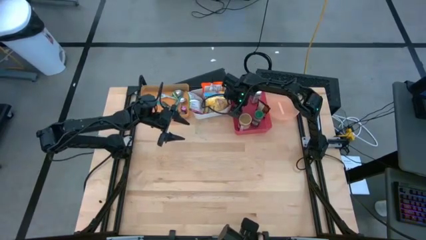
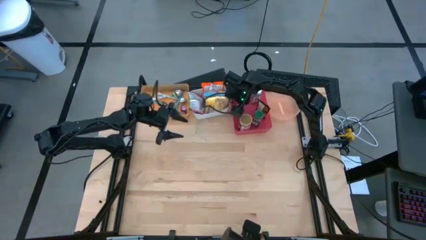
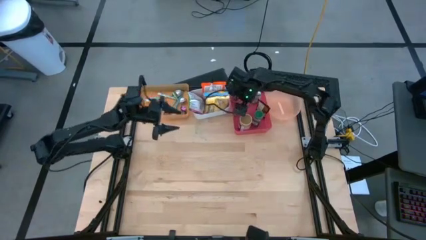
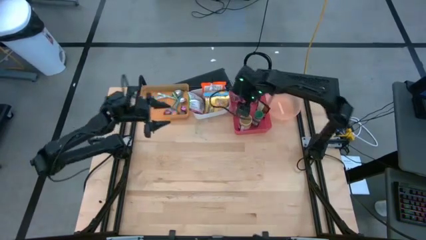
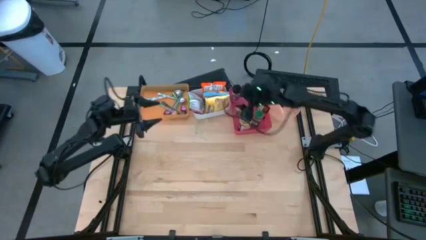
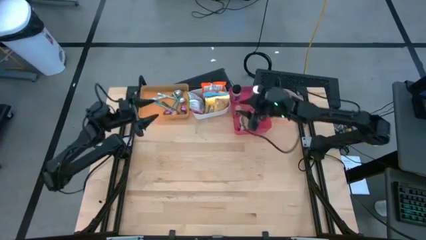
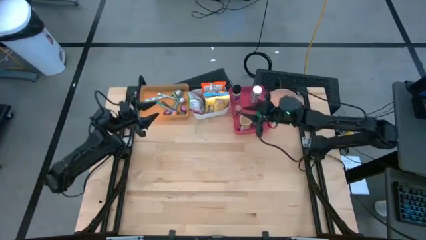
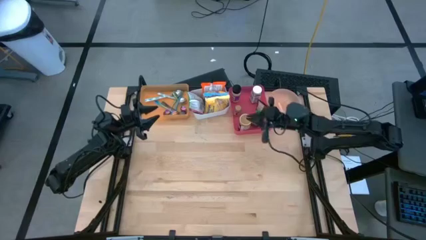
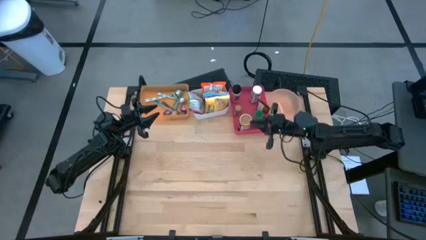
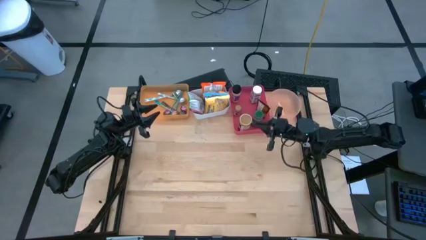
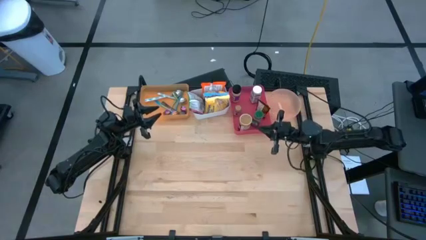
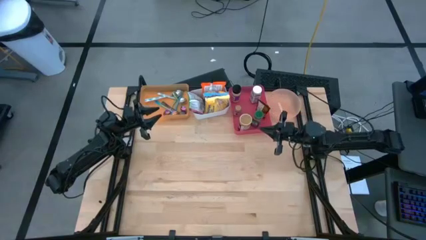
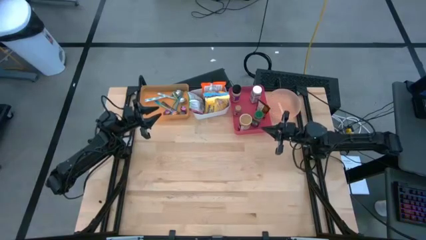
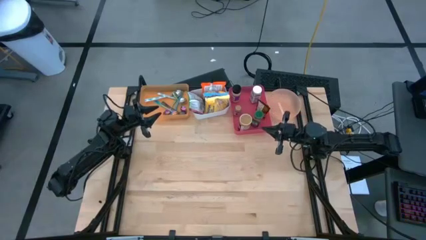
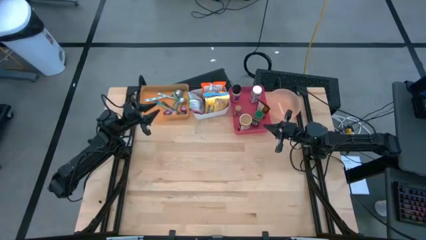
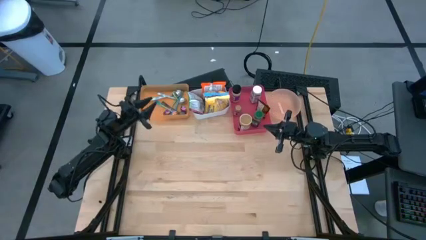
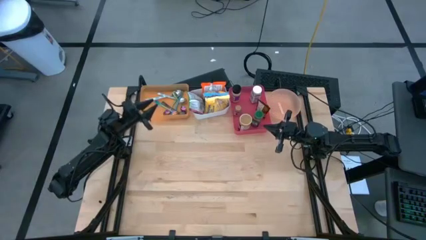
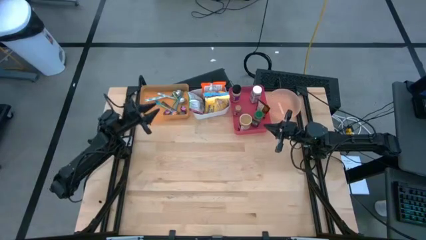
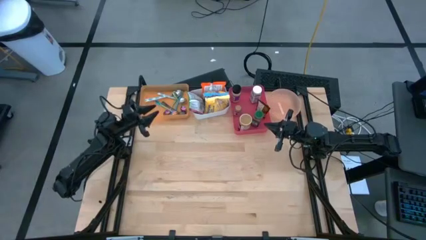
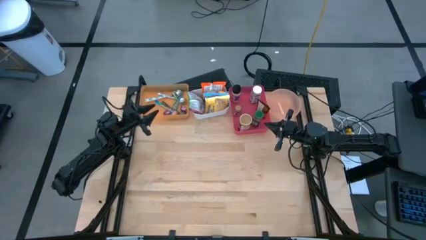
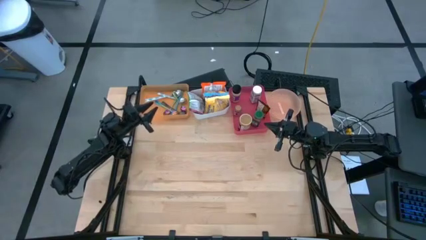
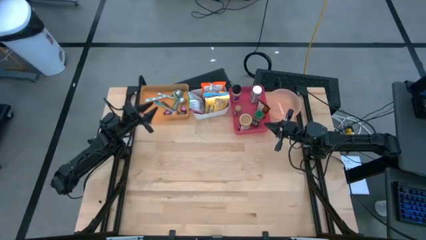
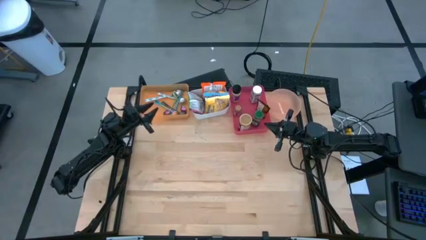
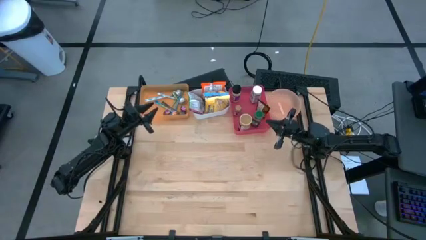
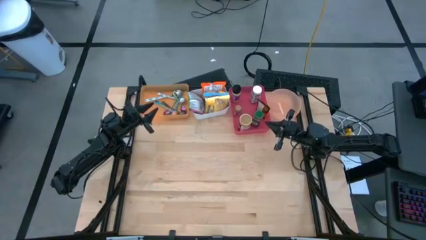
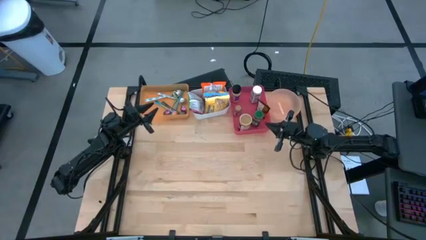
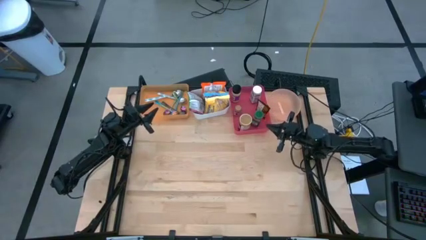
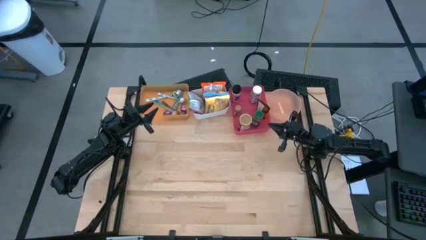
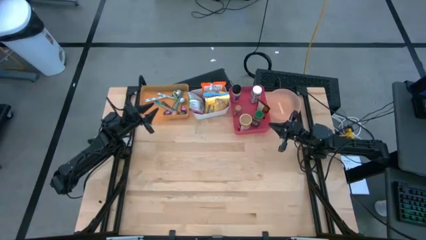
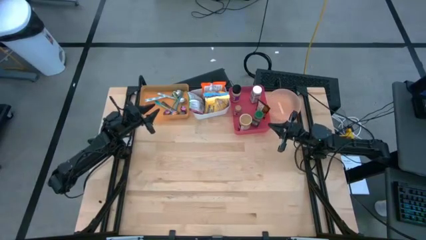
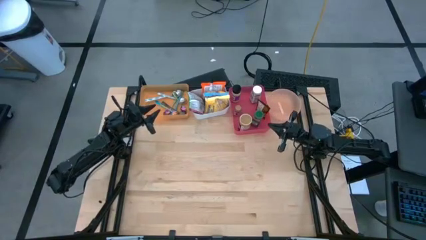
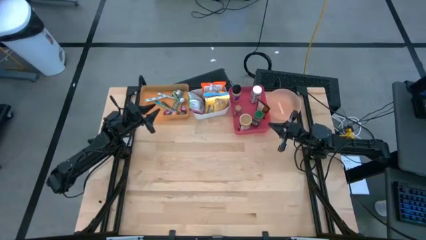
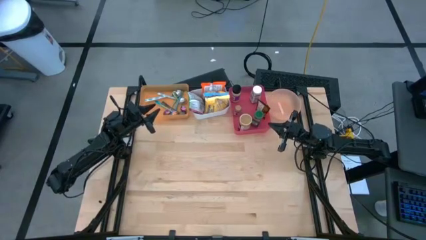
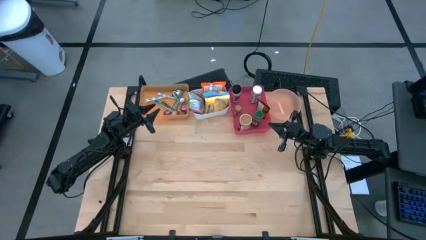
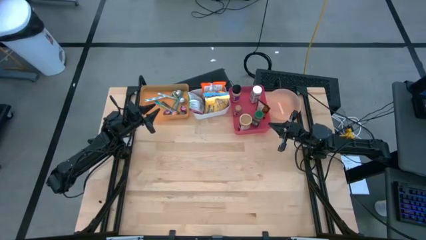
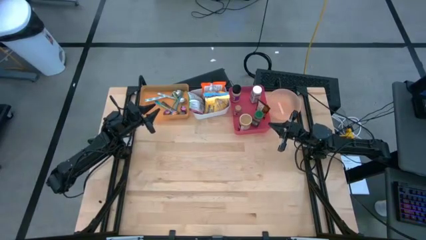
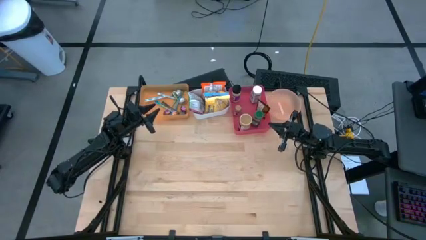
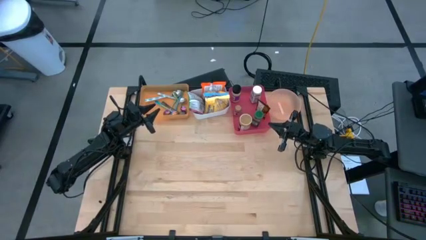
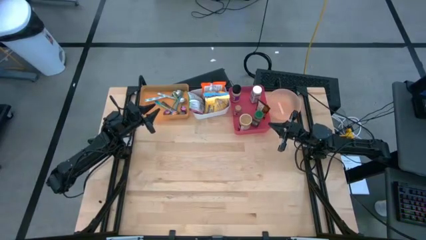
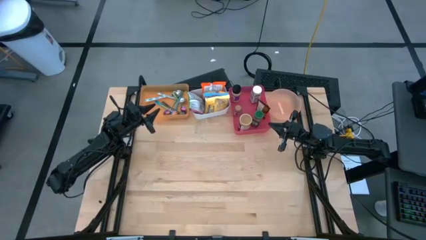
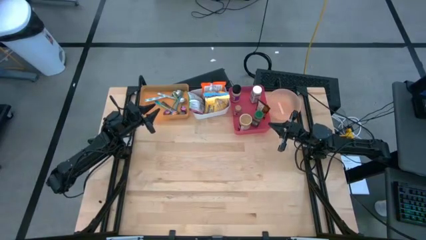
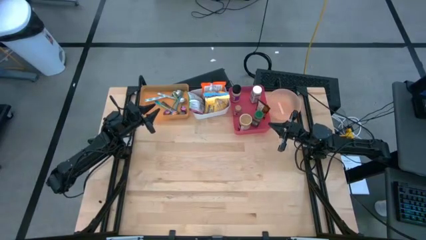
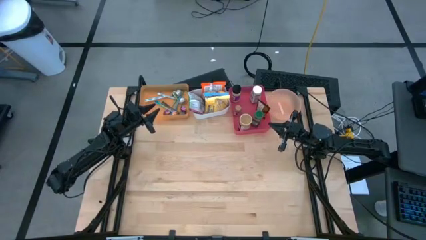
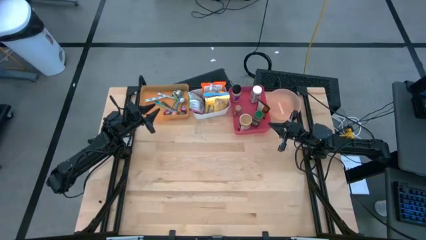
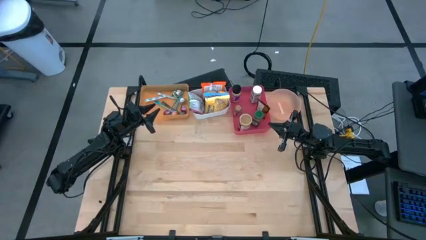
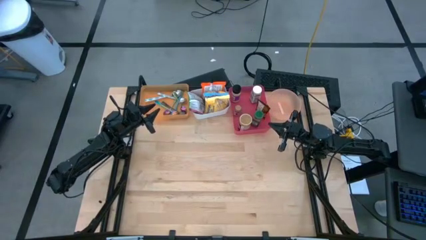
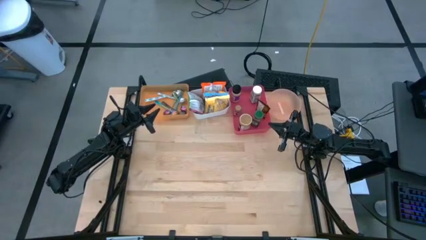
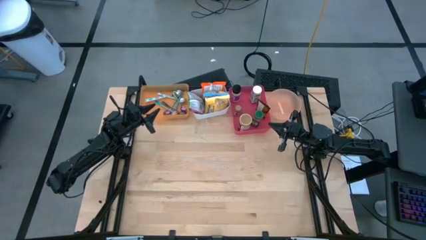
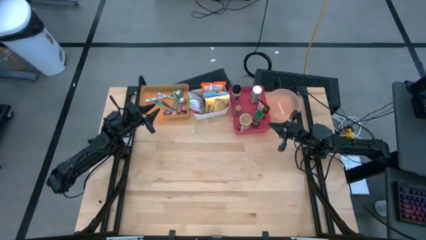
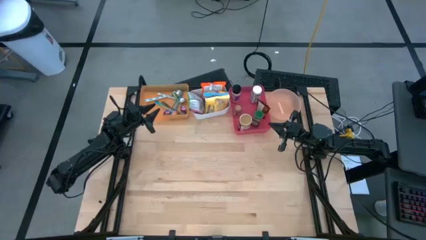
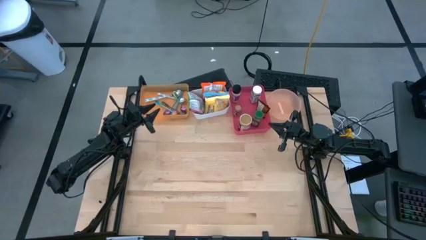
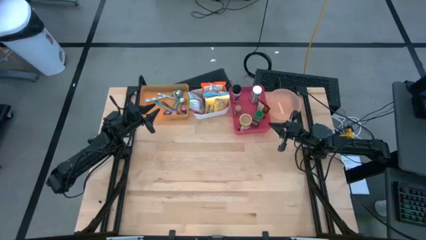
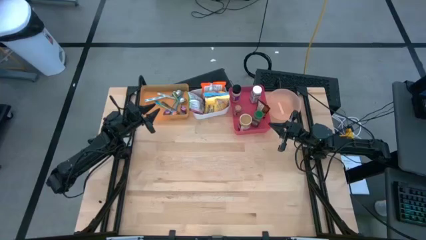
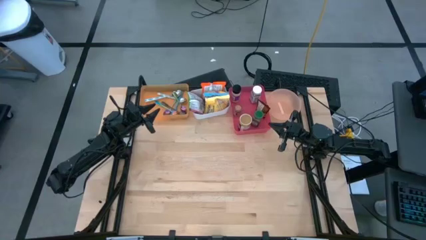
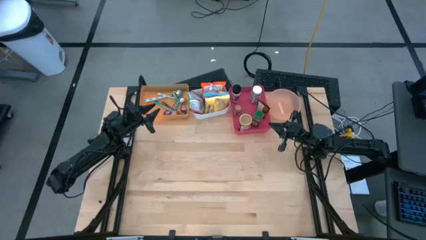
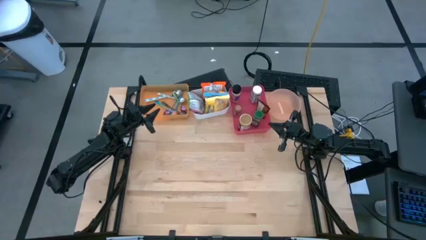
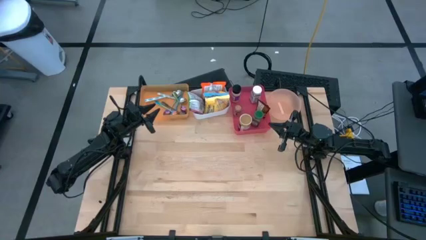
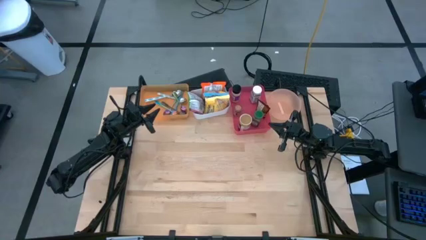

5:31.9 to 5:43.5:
Task: Pick & Place Food Item
Return to Home Position
